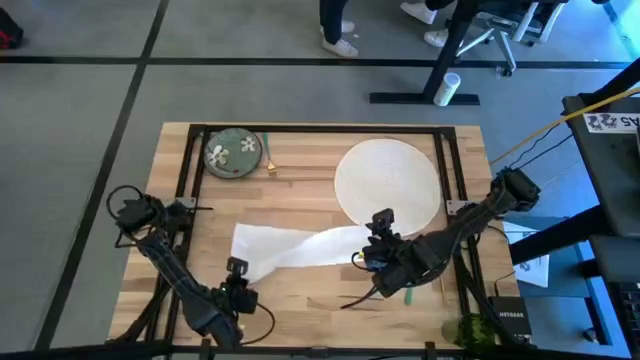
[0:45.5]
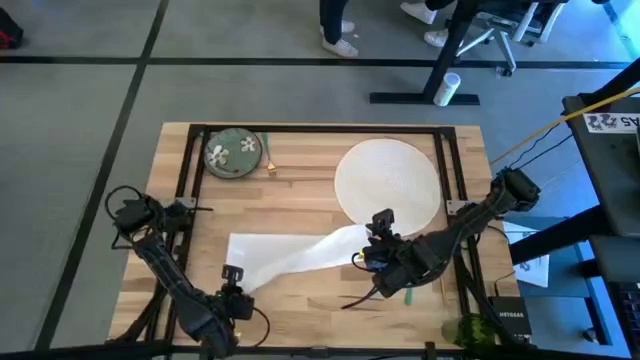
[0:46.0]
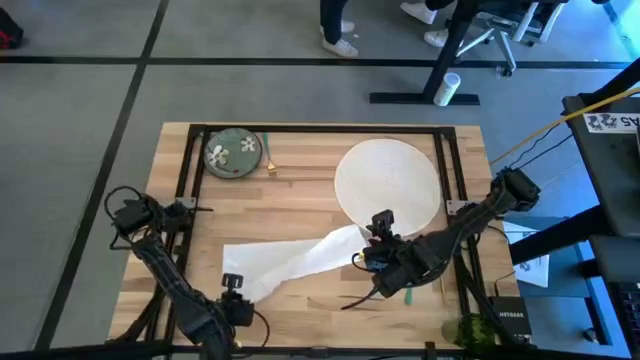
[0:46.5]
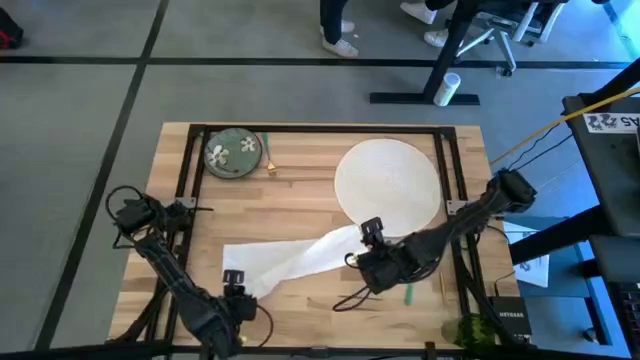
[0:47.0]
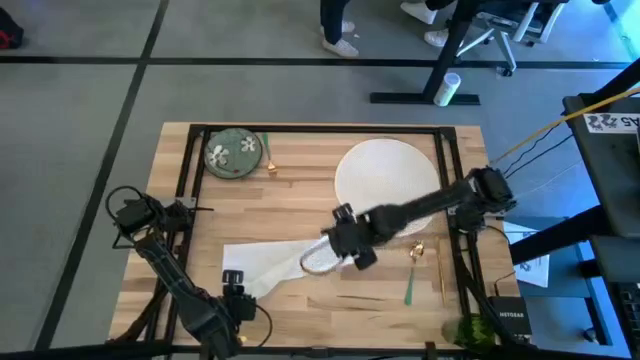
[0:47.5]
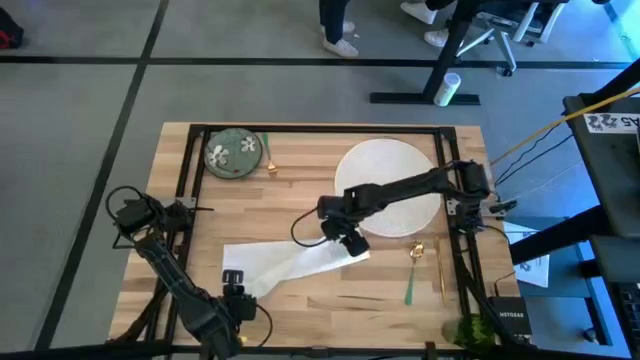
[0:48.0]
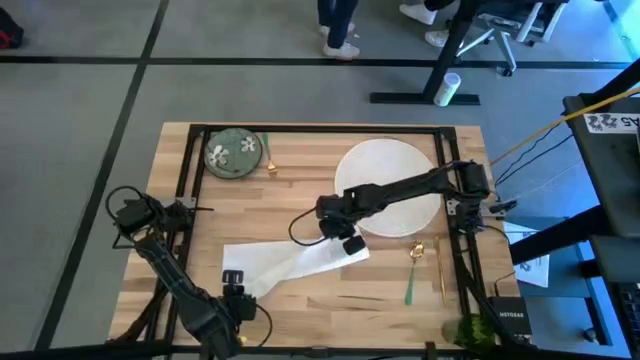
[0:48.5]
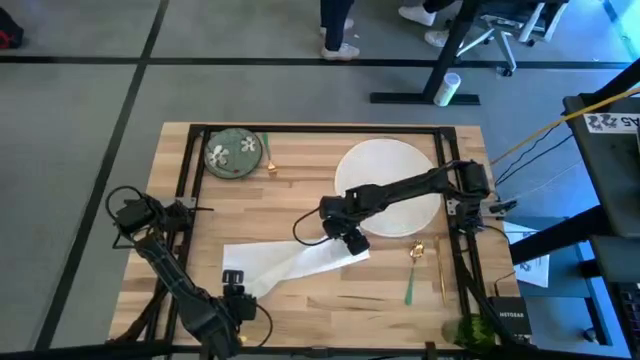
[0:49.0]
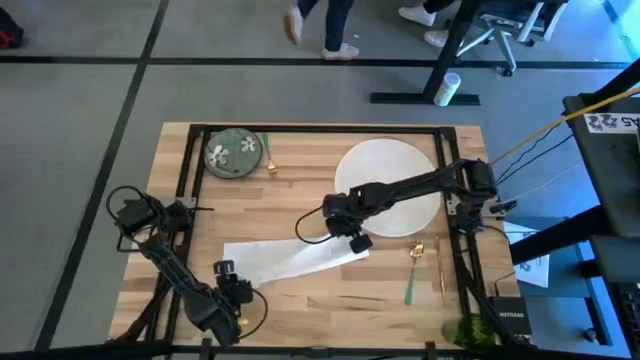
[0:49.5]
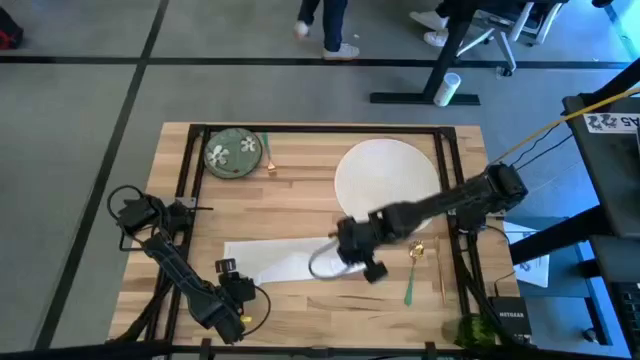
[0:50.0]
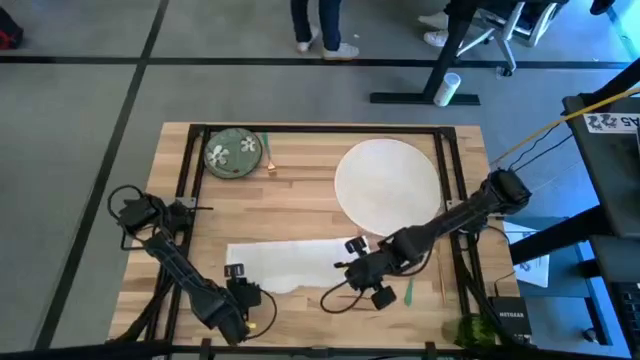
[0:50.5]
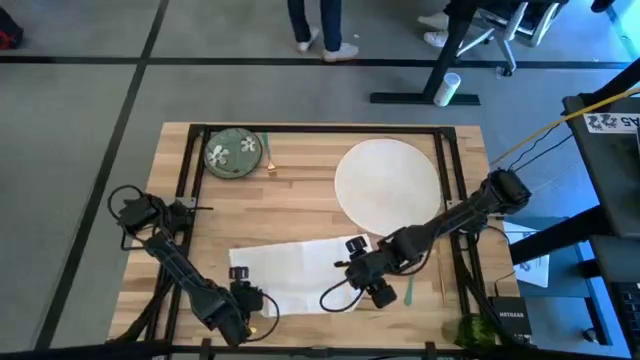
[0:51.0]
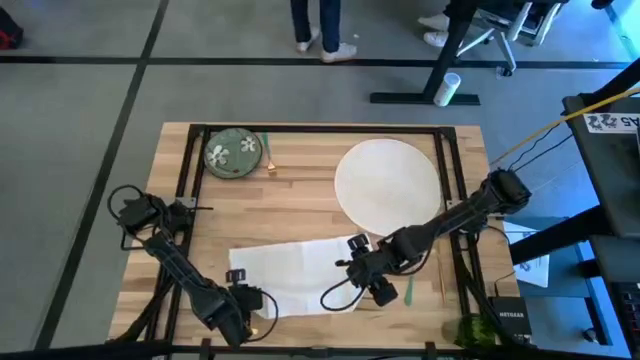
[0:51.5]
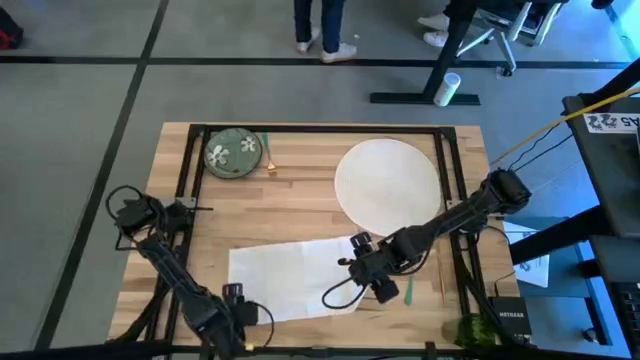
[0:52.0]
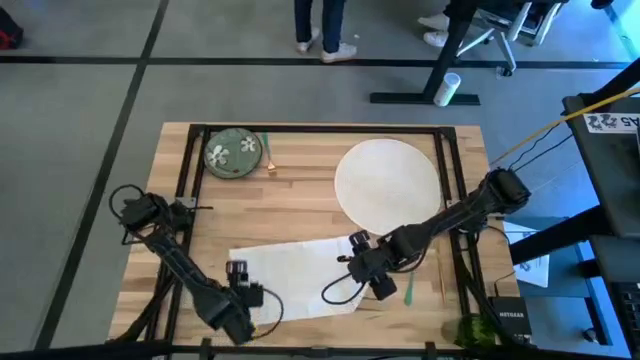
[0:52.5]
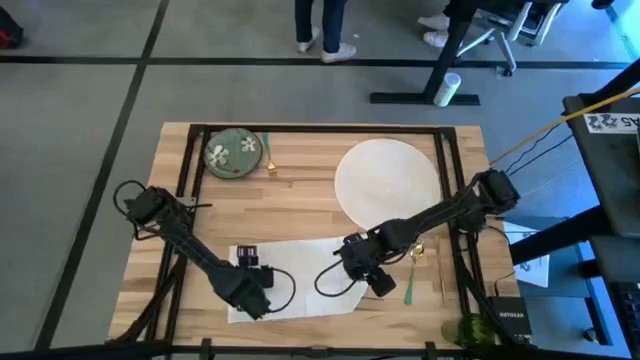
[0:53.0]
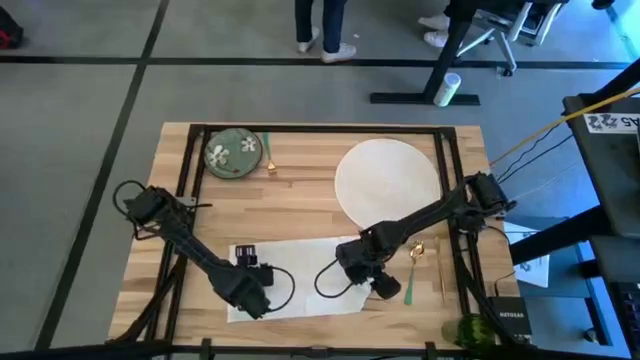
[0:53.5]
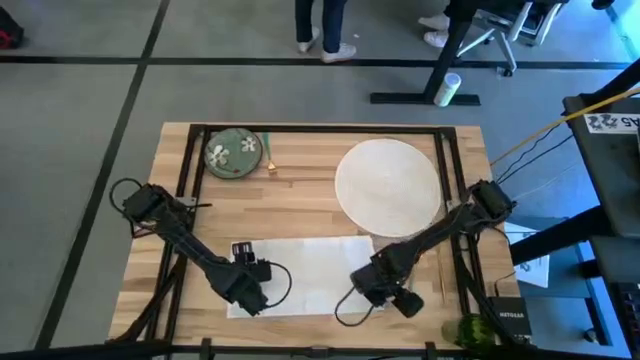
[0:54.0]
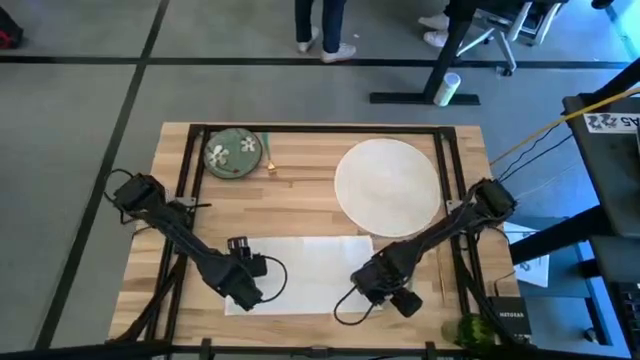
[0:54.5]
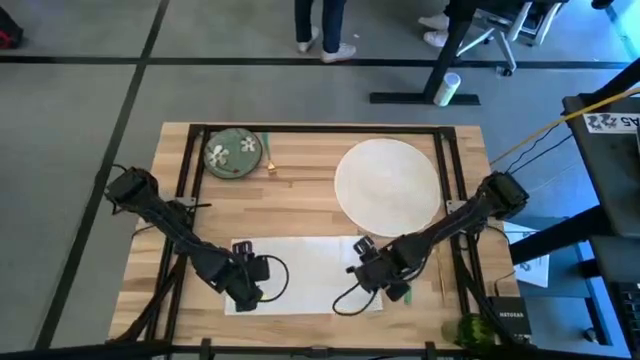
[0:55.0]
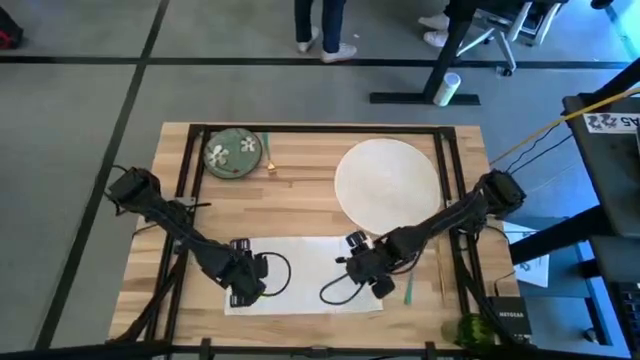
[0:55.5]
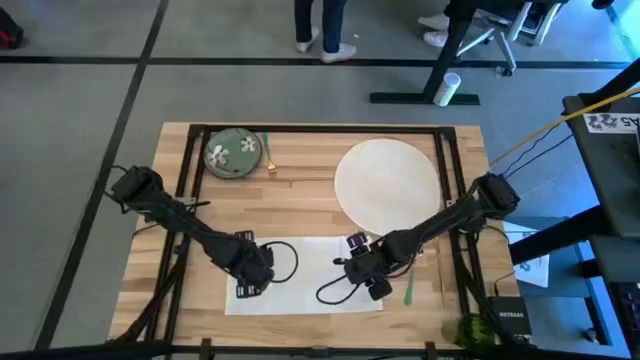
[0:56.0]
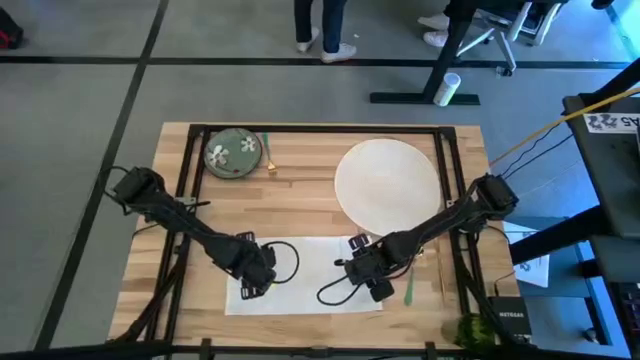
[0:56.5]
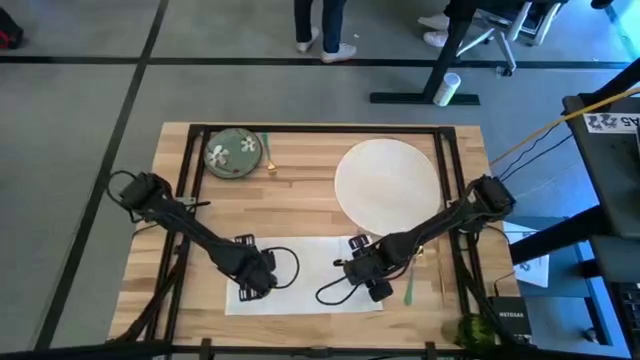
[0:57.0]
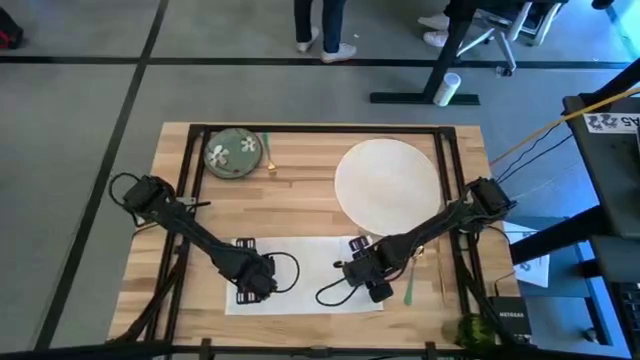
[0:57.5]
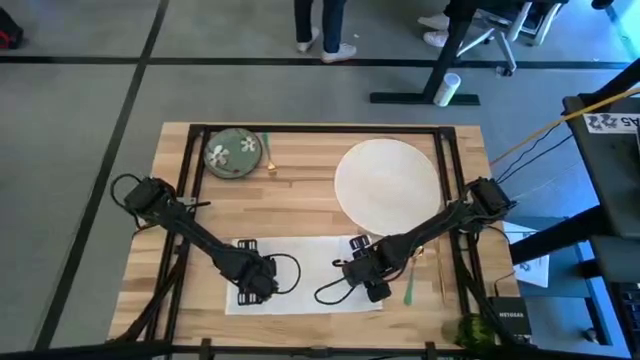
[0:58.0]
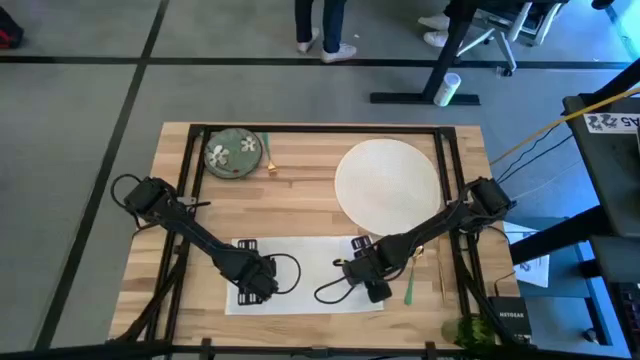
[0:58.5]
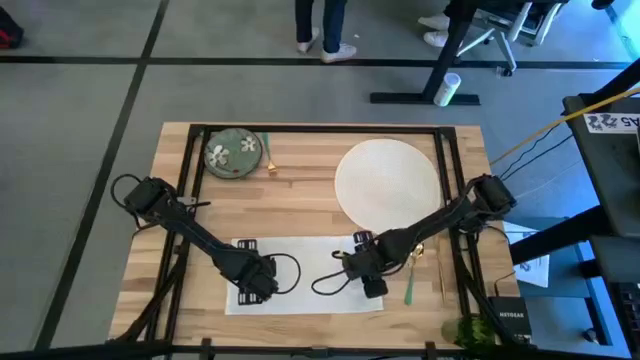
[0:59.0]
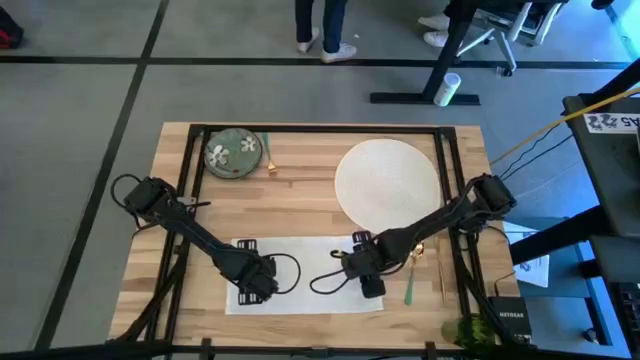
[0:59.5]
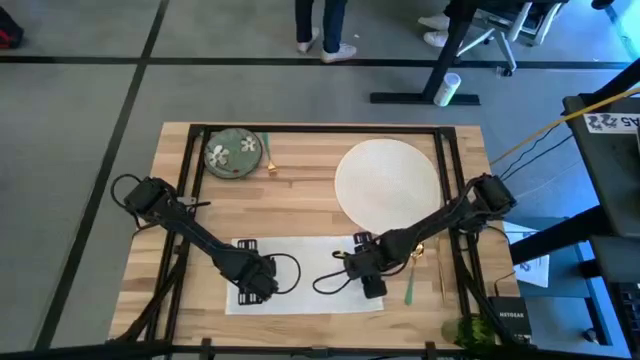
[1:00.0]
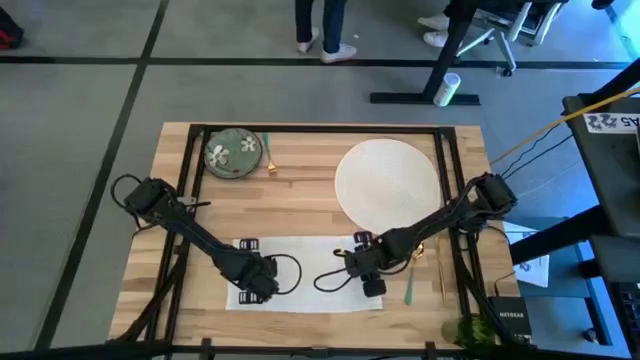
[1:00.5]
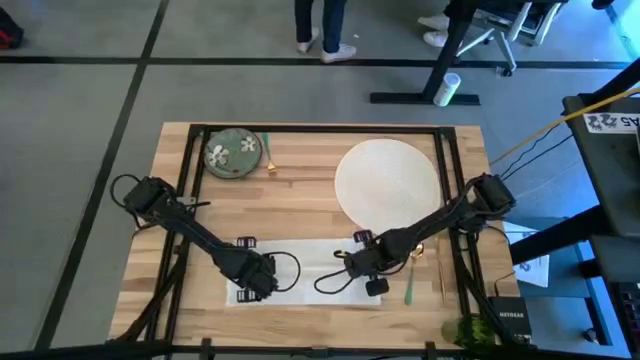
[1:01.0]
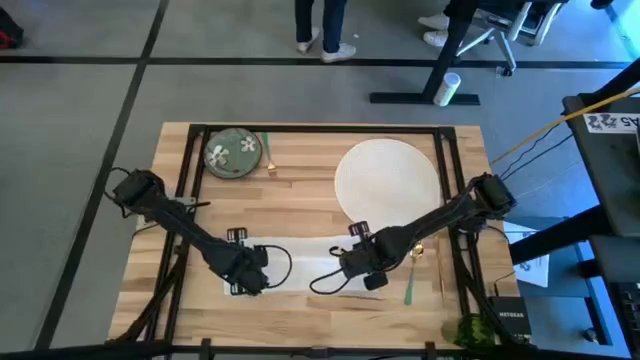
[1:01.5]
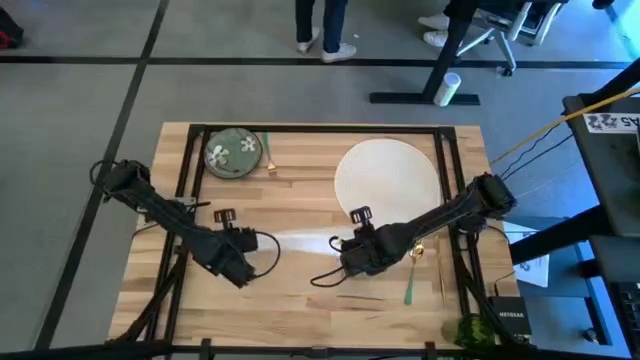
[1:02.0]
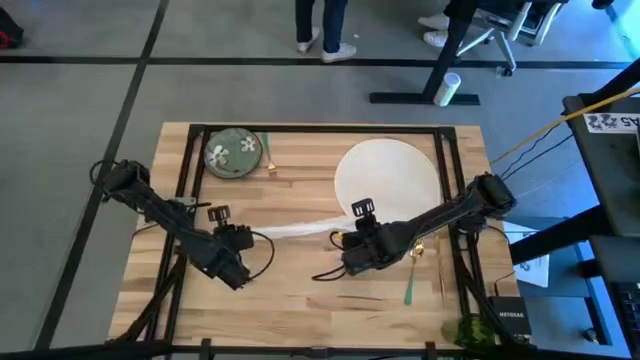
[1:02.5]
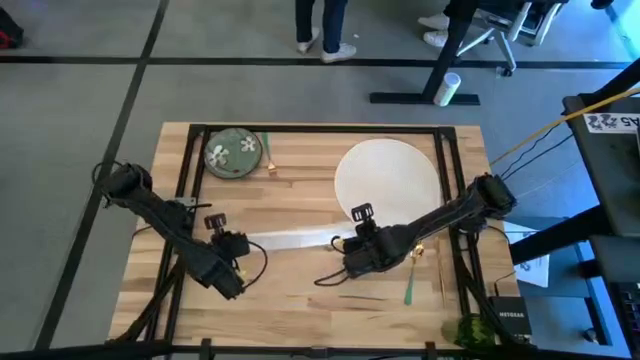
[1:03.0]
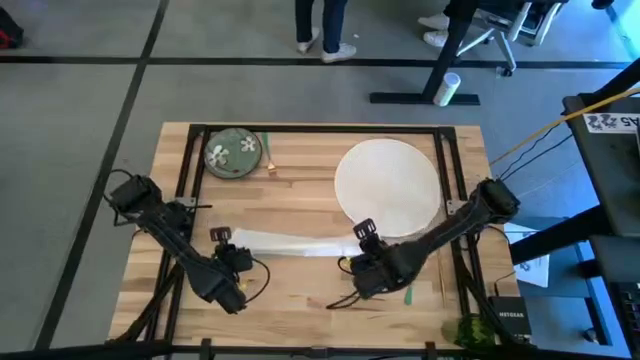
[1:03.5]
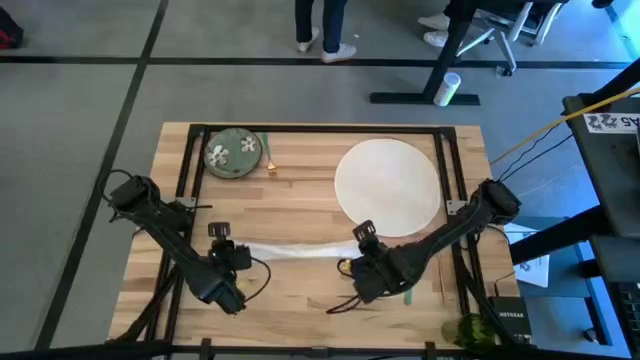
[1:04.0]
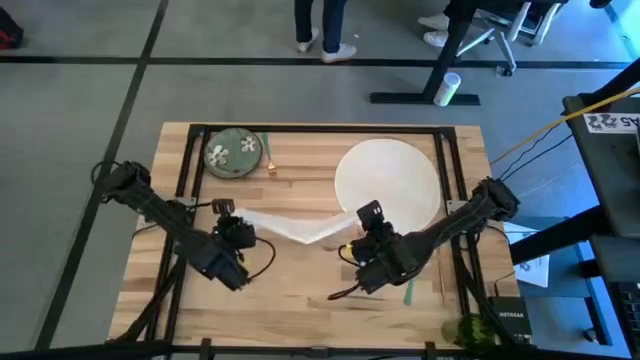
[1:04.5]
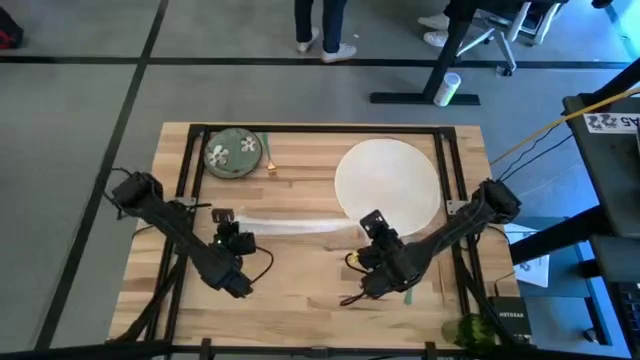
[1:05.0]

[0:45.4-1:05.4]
Task: Set table place
Fold the white table napkin

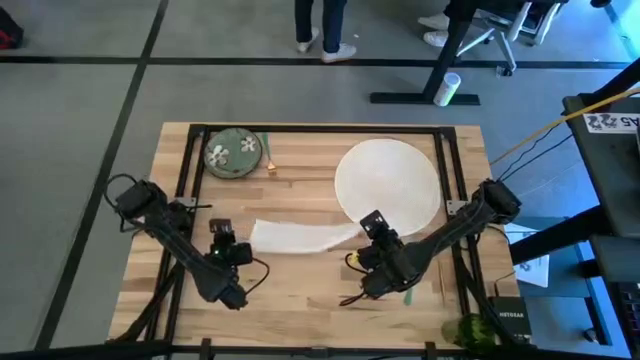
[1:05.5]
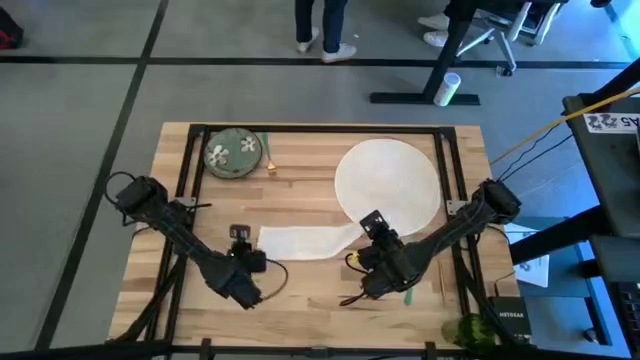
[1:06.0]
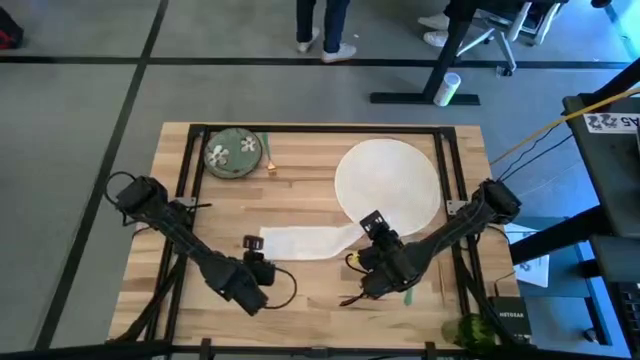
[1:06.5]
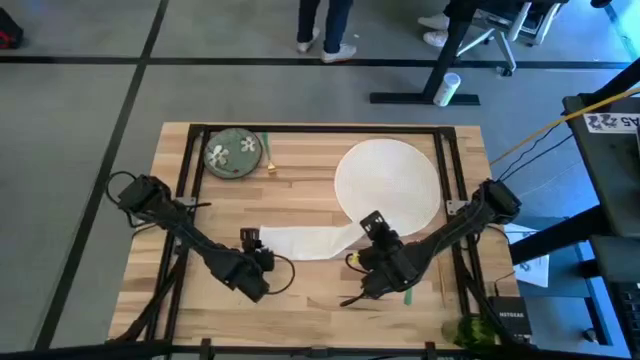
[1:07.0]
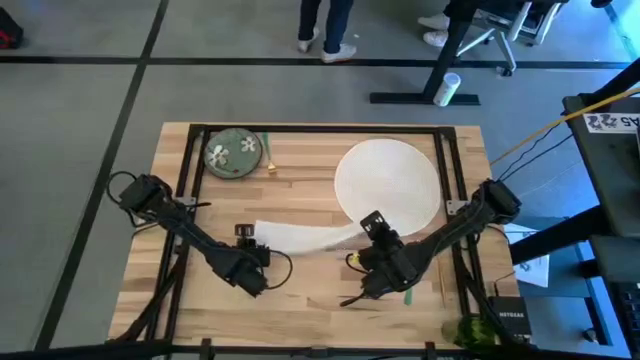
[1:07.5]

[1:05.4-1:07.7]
Fold the white table napkin
